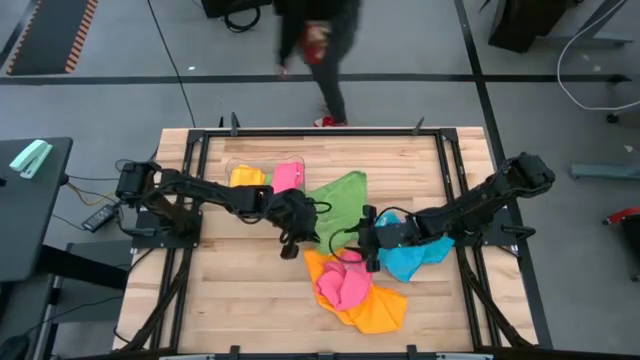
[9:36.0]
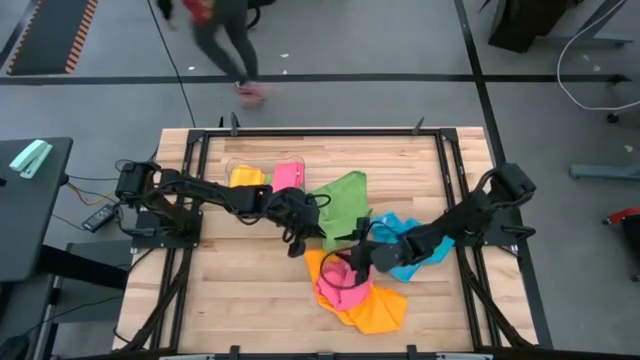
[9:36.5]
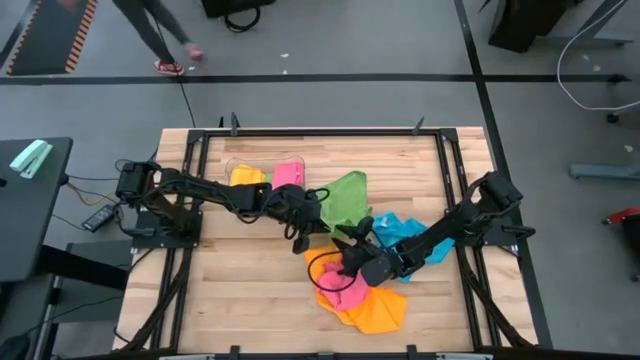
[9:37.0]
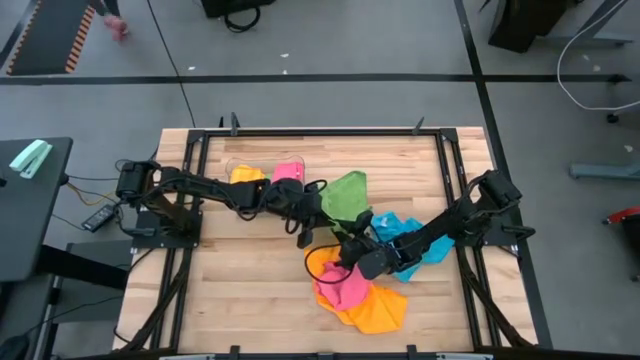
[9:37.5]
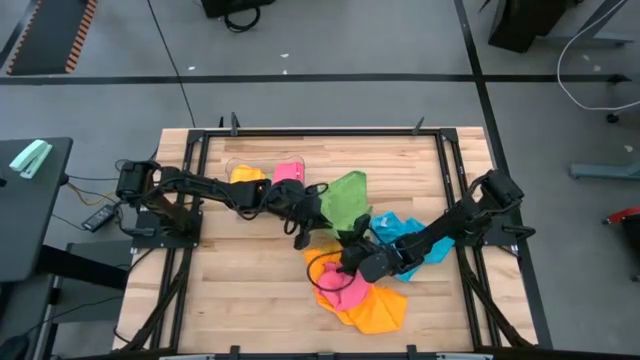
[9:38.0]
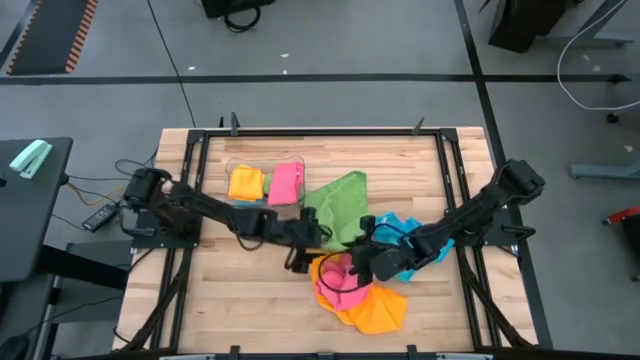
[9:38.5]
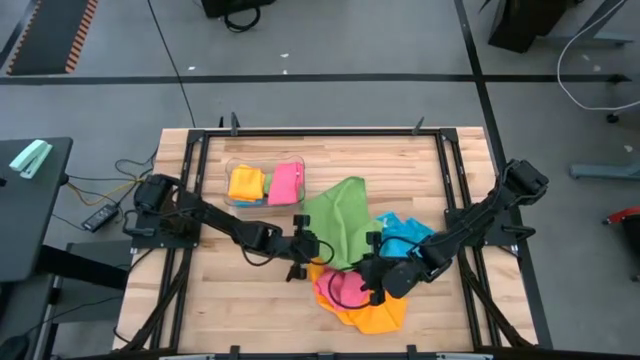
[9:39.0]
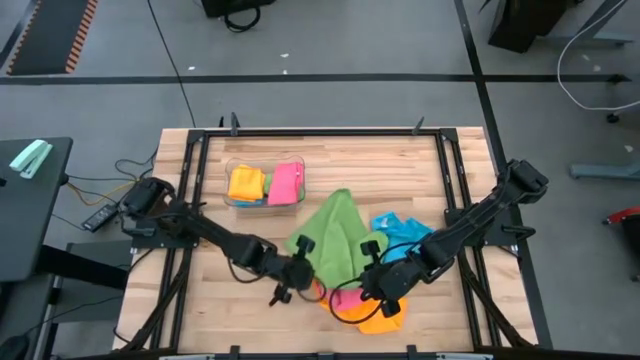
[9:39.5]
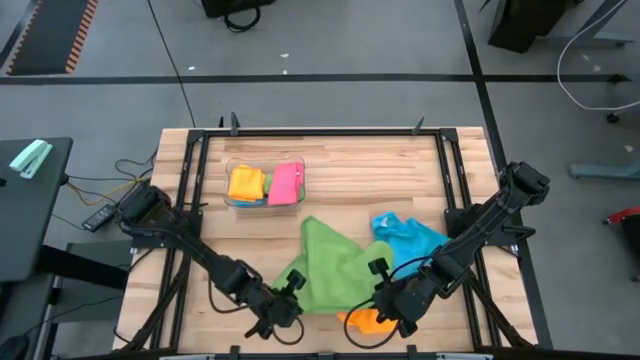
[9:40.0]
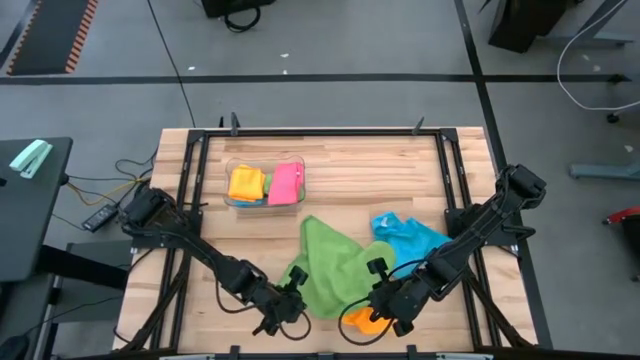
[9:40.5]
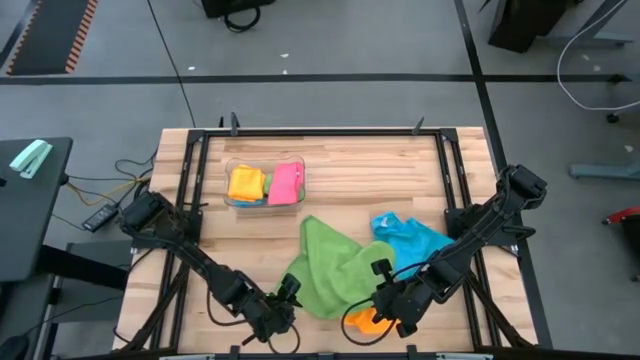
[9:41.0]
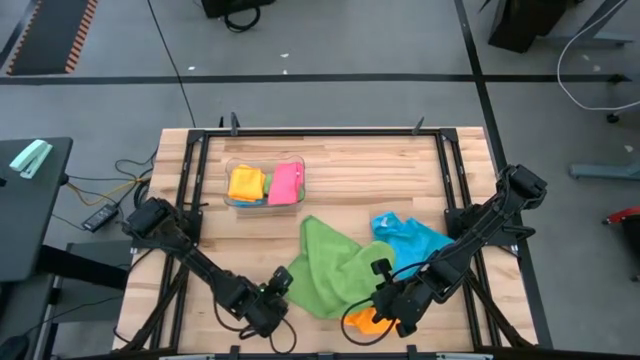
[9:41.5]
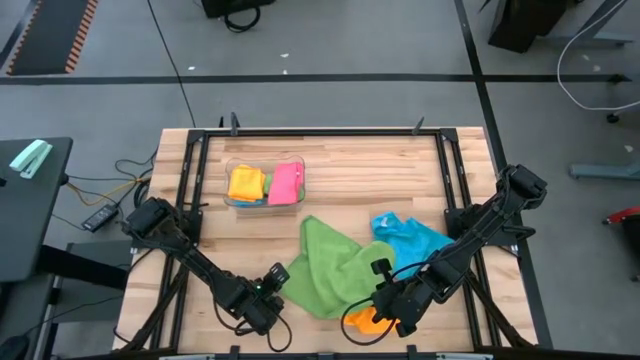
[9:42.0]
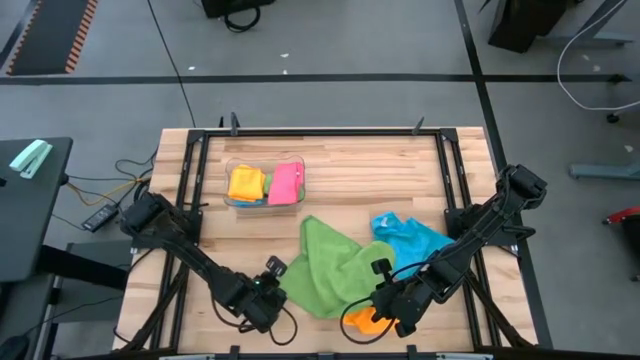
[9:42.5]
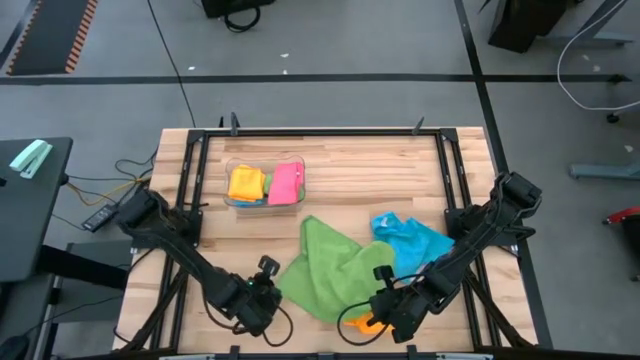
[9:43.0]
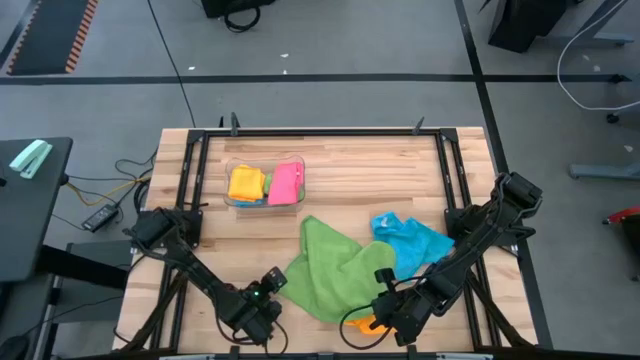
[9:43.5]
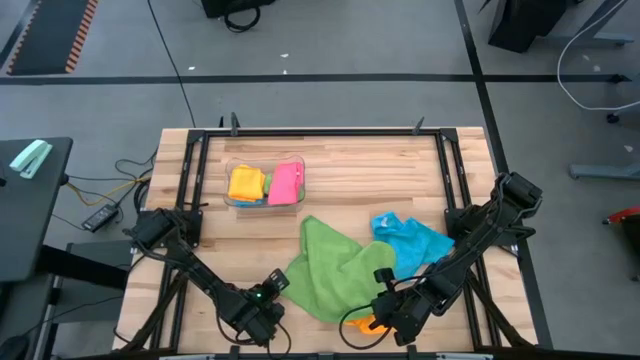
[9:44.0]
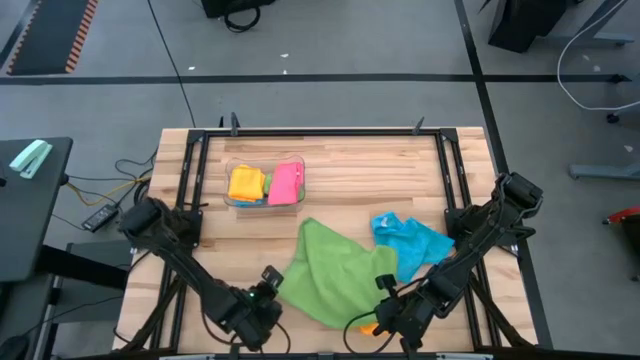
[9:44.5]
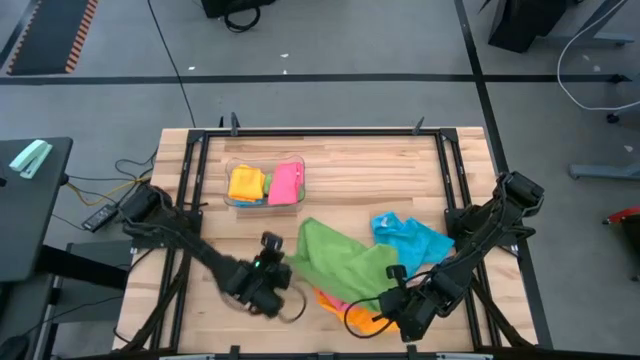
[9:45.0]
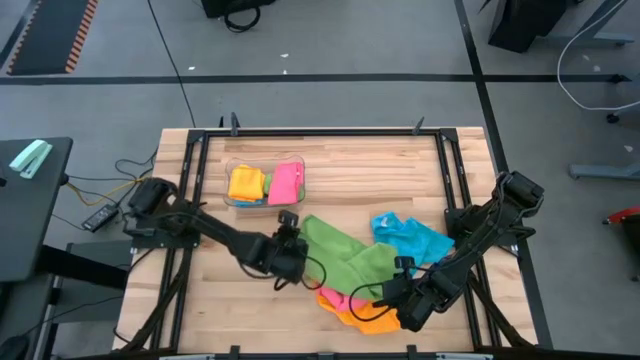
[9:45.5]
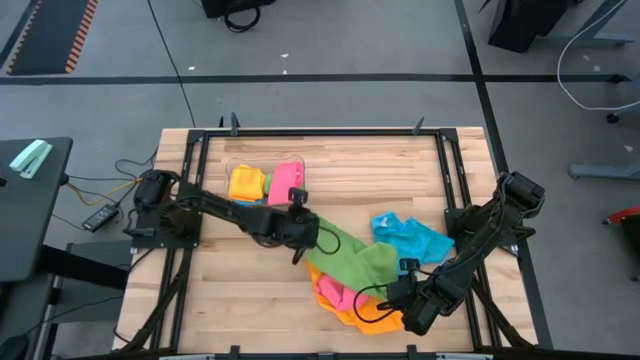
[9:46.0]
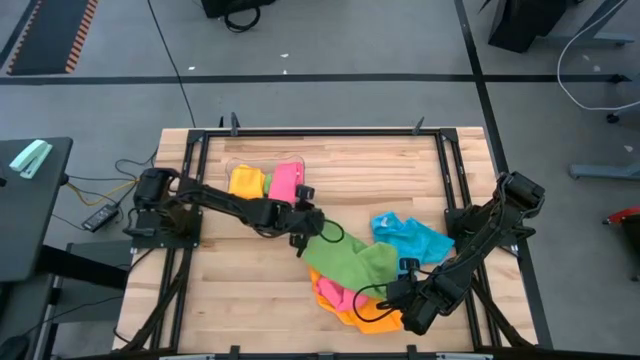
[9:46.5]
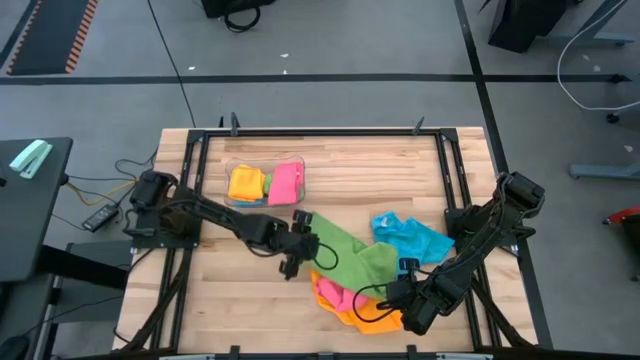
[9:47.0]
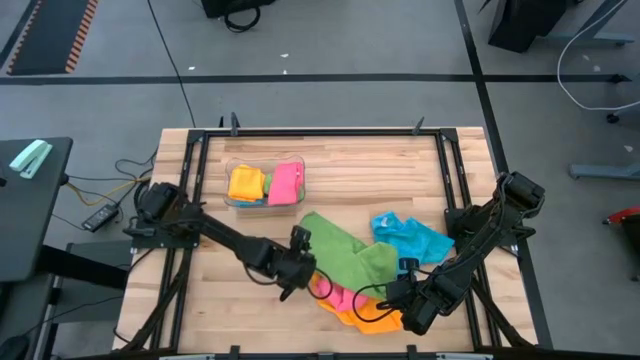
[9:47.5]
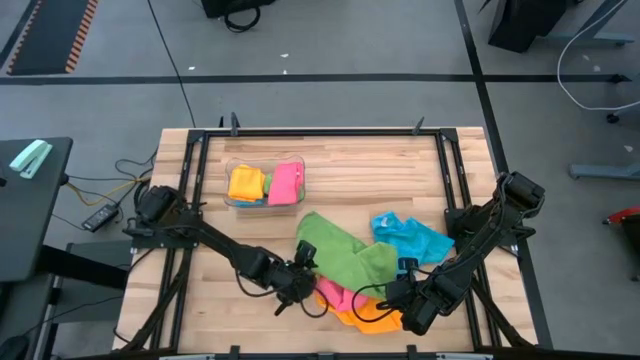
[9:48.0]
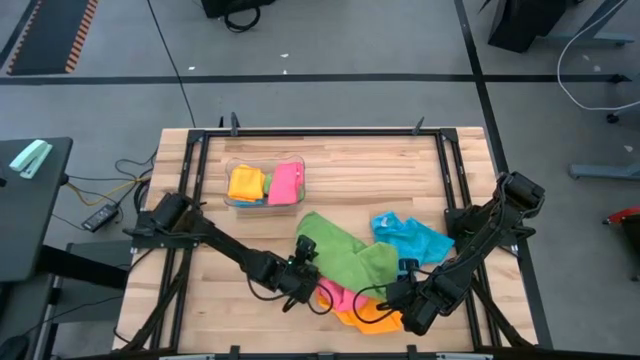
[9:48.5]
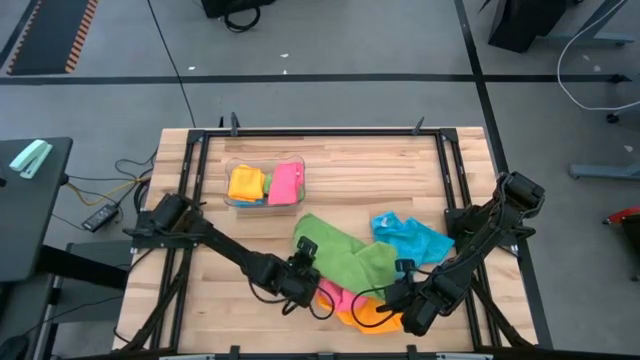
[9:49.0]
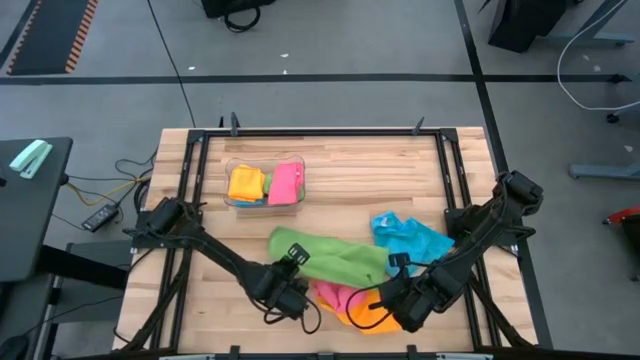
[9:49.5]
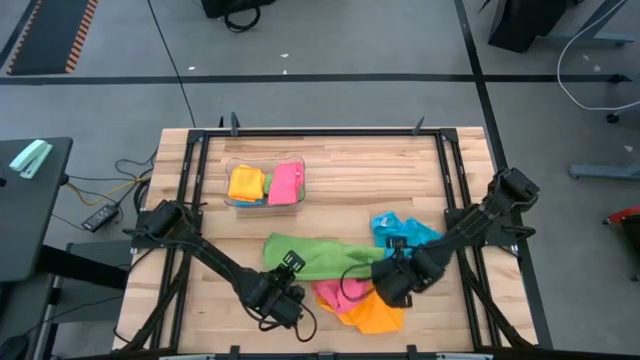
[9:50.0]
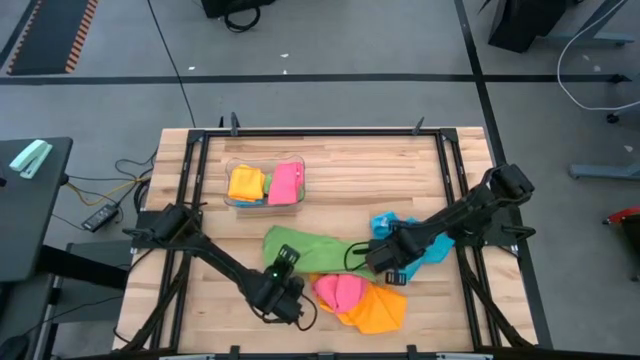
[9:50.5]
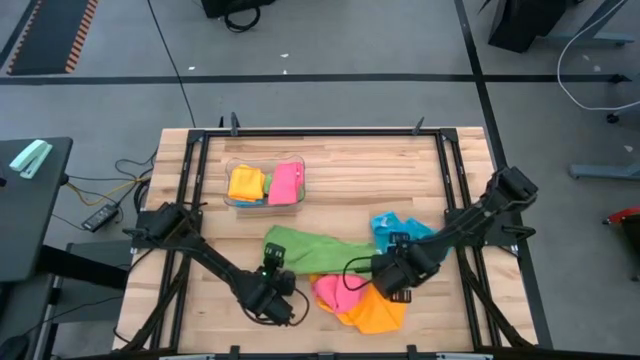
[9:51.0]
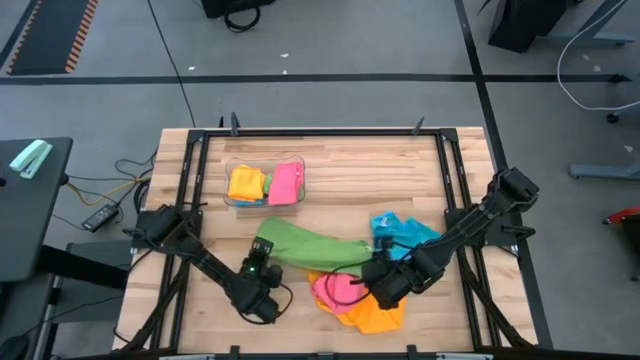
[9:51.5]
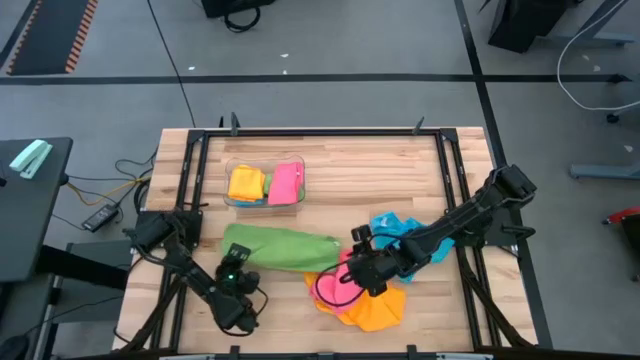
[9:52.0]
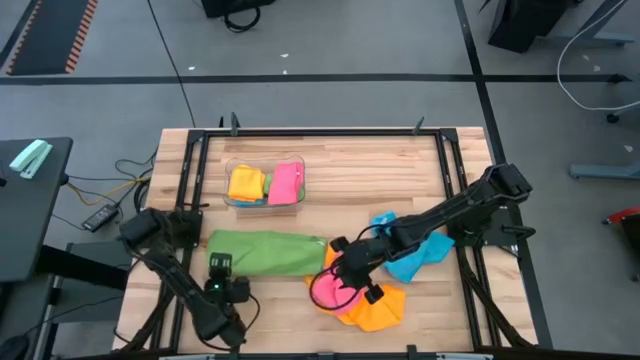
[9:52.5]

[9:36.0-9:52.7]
Task: Fold microfiber towels
Fold the green microfiber towel

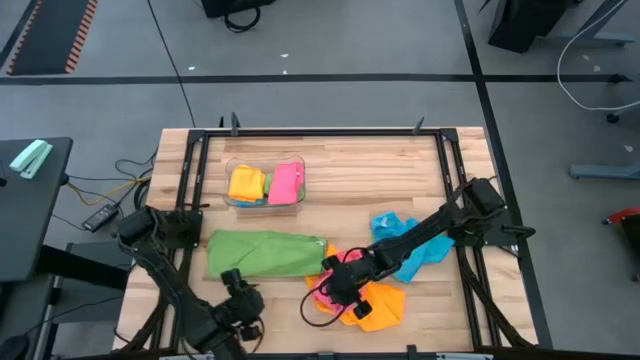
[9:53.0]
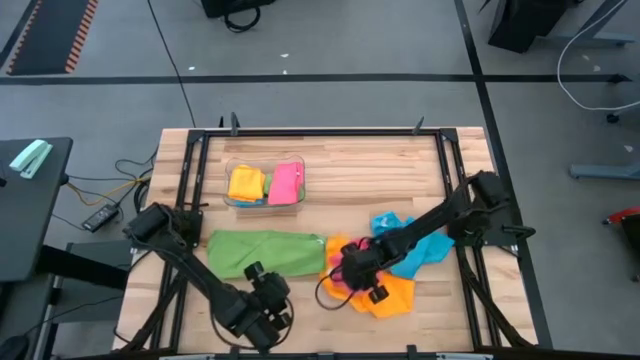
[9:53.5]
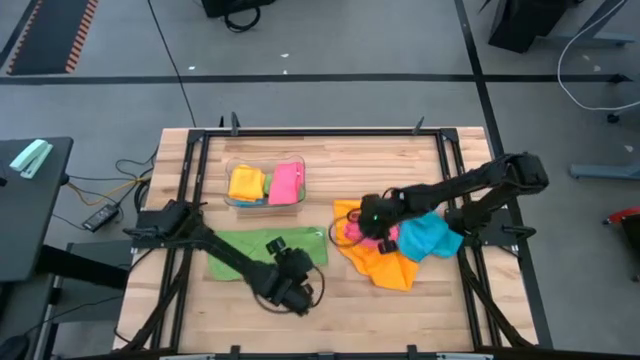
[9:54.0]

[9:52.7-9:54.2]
Adjust the microfiber towels on the table

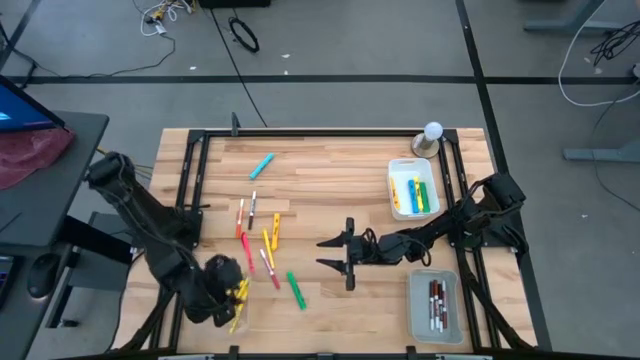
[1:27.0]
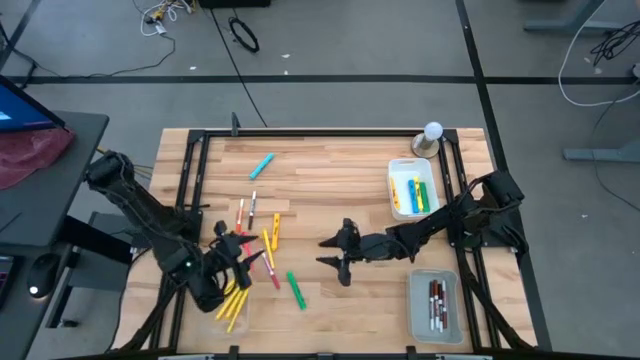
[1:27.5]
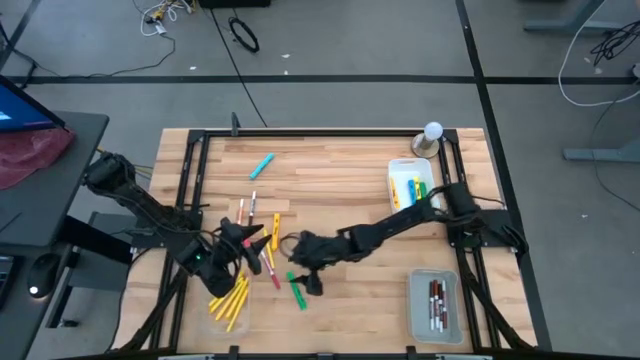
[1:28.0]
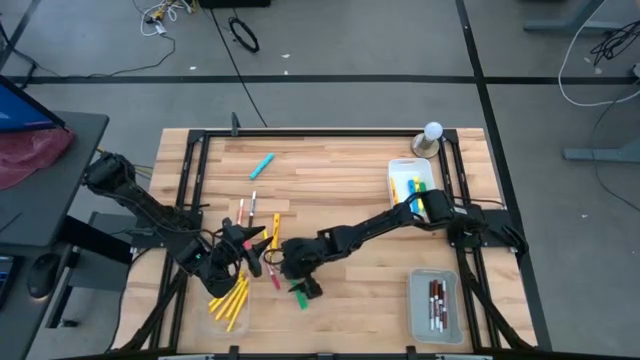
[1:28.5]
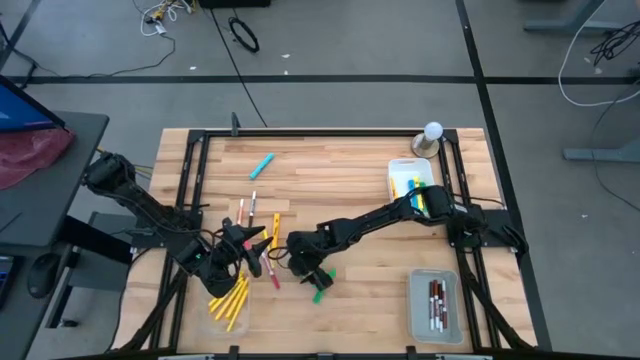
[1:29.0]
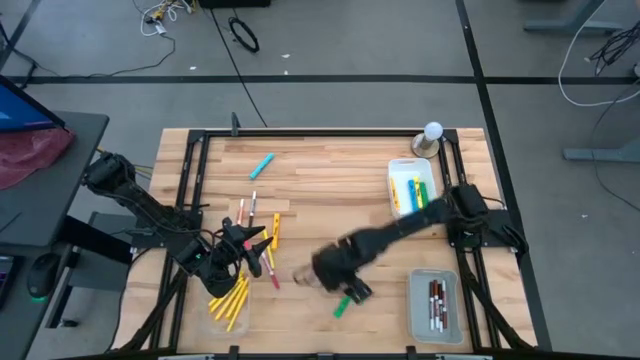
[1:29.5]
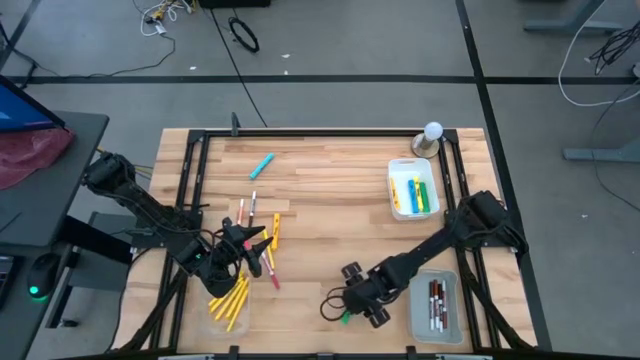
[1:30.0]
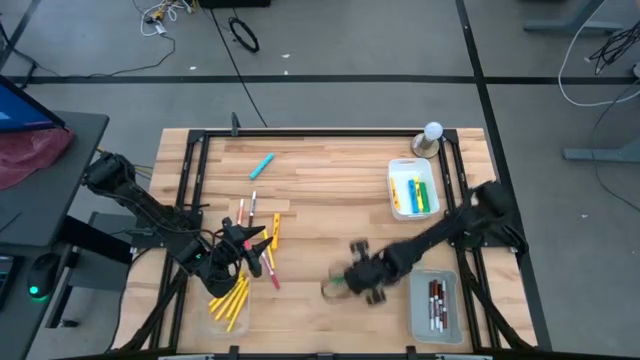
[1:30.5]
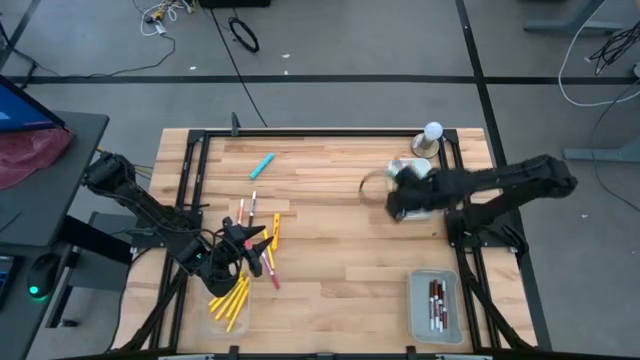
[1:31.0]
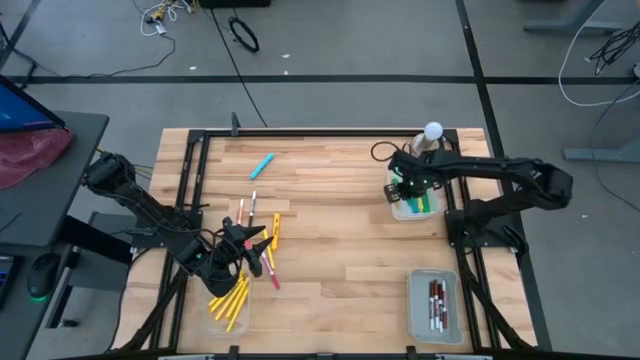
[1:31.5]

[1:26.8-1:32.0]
Task: Pick & Place Markers
Put the green highlighter into the white bin
